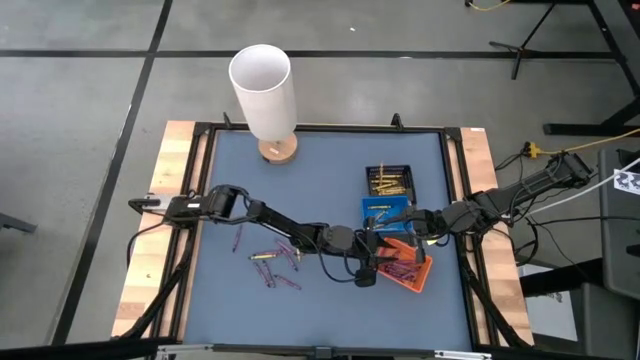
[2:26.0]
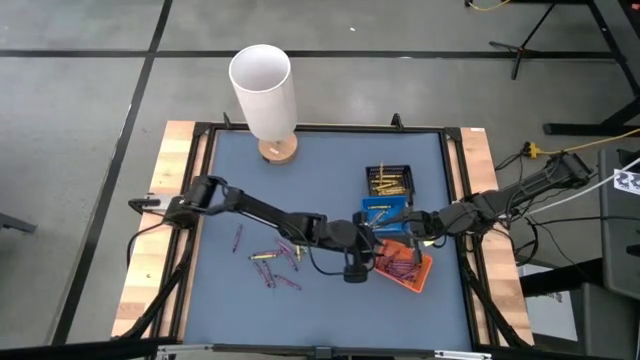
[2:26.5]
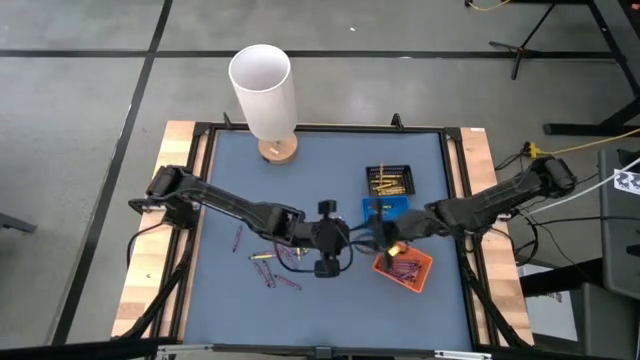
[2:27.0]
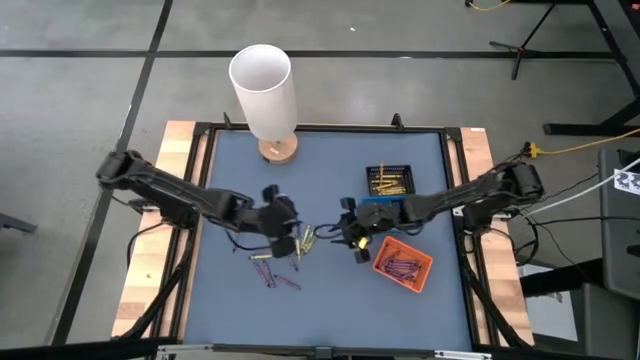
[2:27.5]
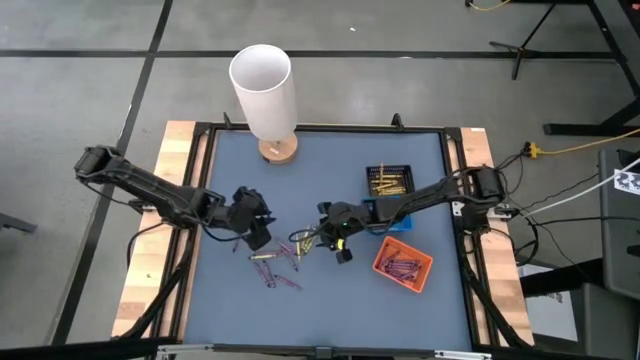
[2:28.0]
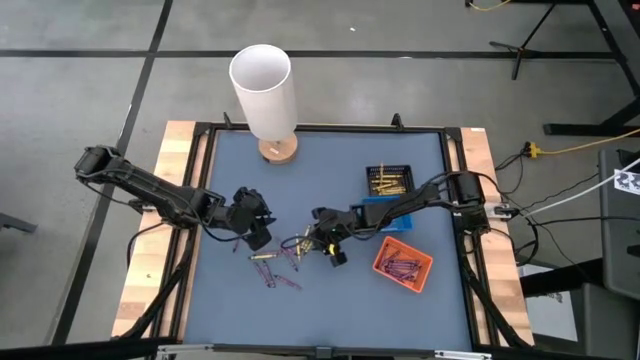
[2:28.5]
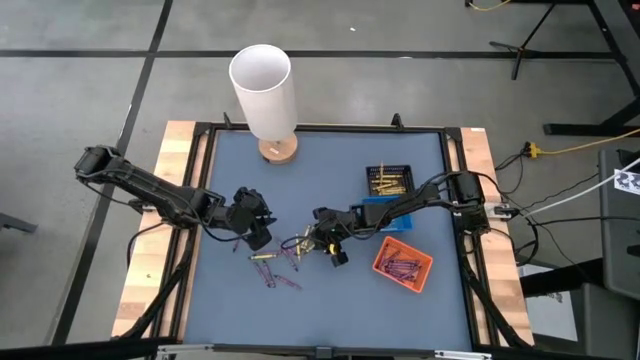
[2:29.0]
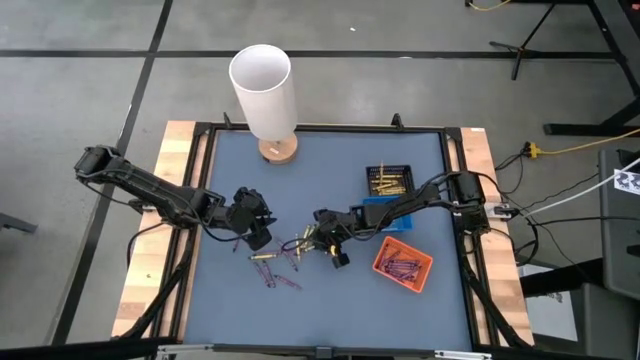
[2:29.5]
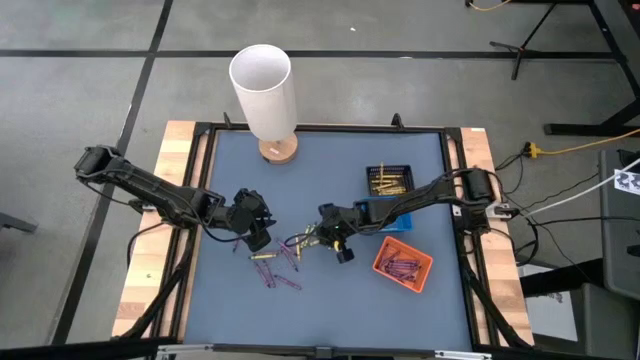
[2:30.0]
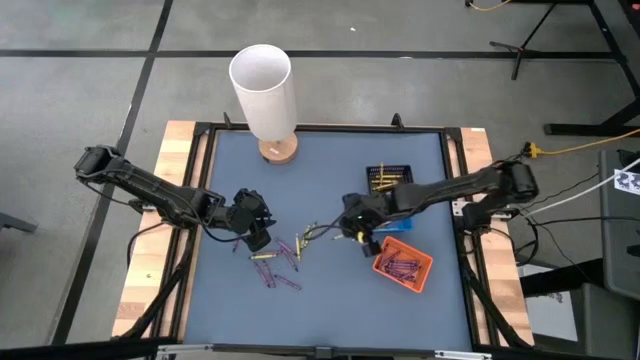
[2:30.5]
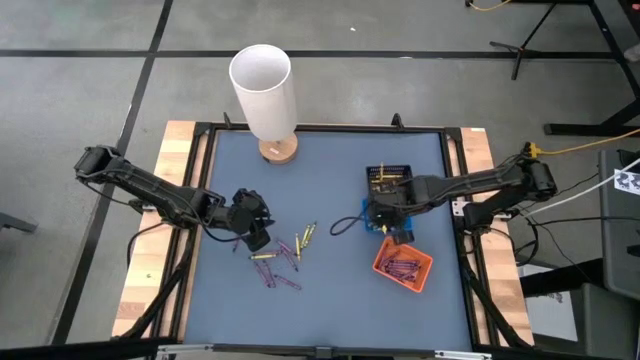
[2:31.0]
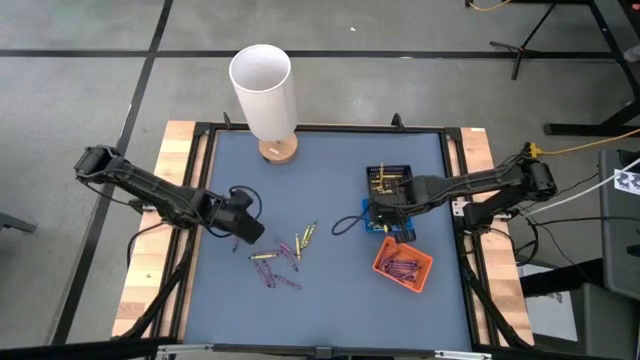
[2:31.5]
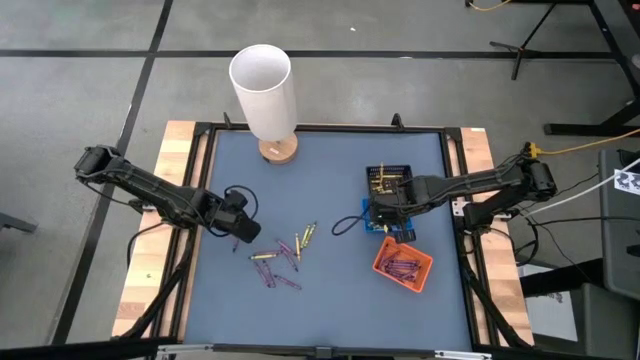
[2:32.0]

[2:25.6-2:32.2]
Task: Sort crayons
Put the green crayon into the blue bin

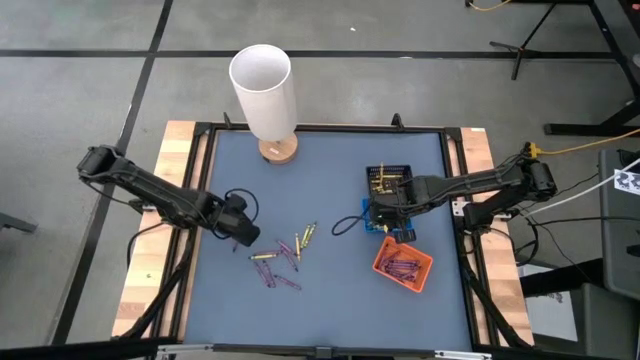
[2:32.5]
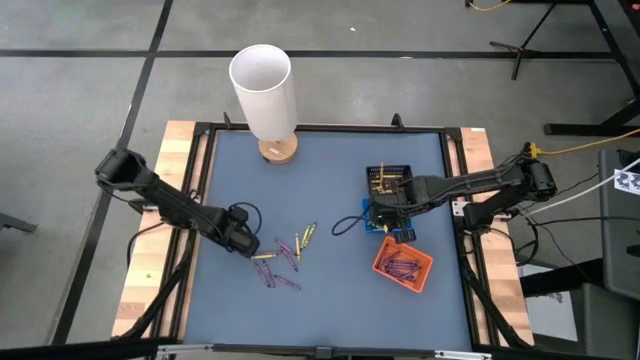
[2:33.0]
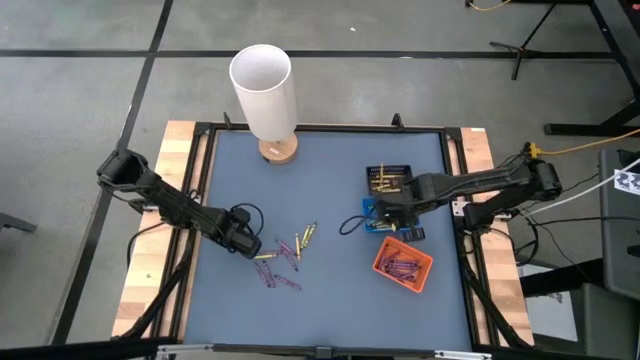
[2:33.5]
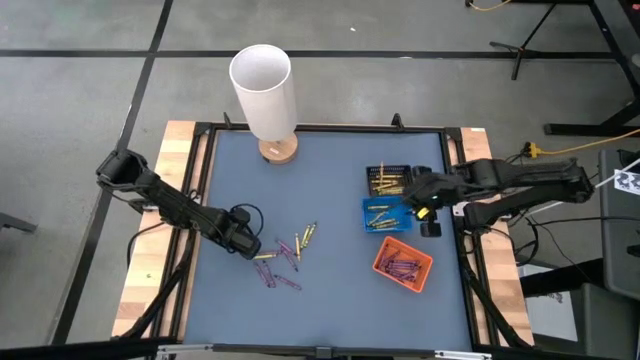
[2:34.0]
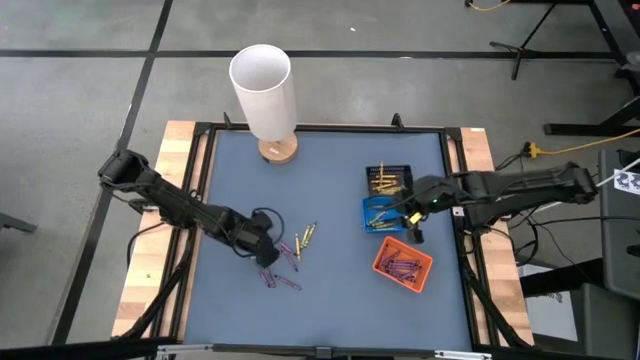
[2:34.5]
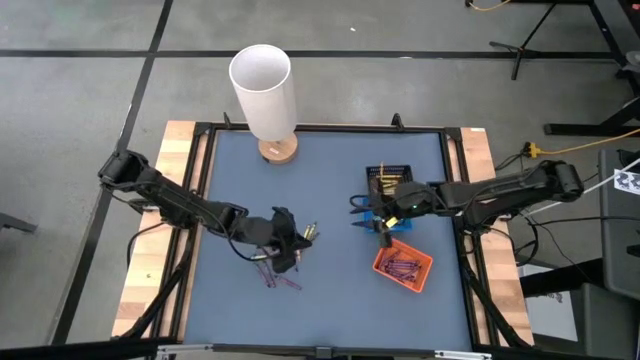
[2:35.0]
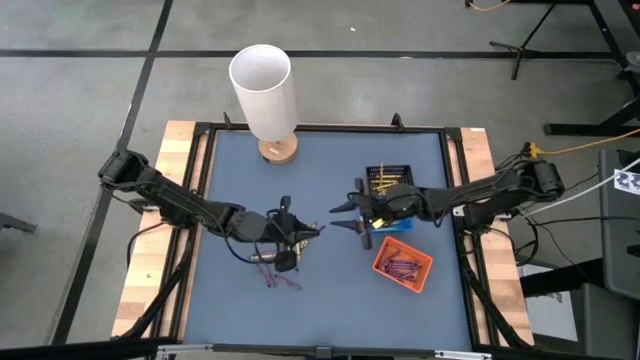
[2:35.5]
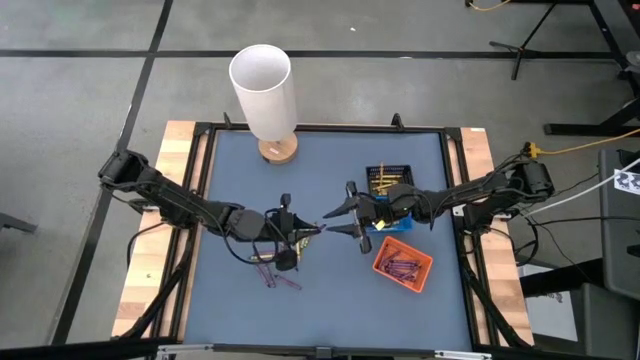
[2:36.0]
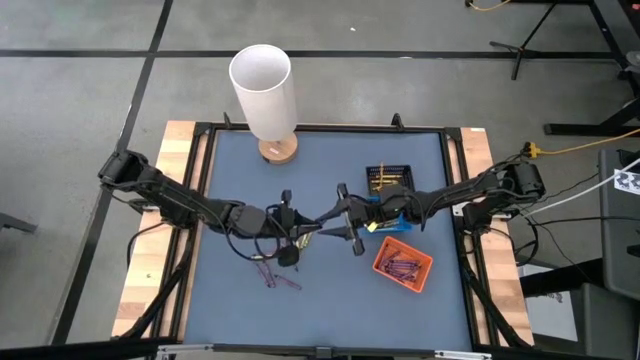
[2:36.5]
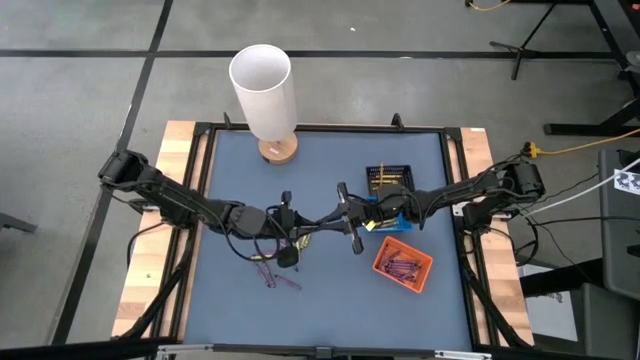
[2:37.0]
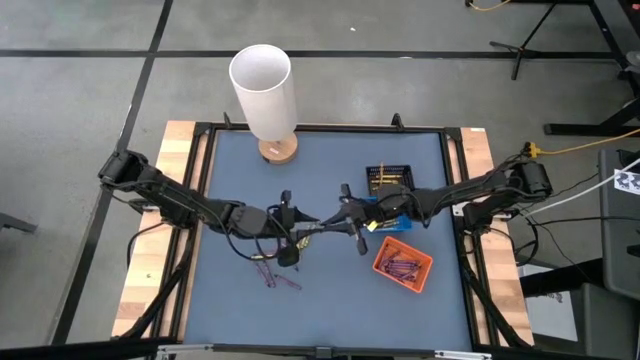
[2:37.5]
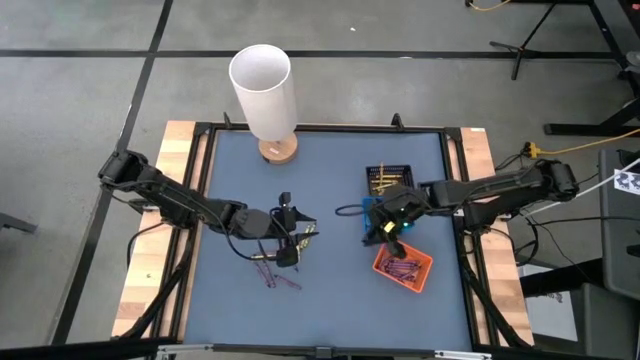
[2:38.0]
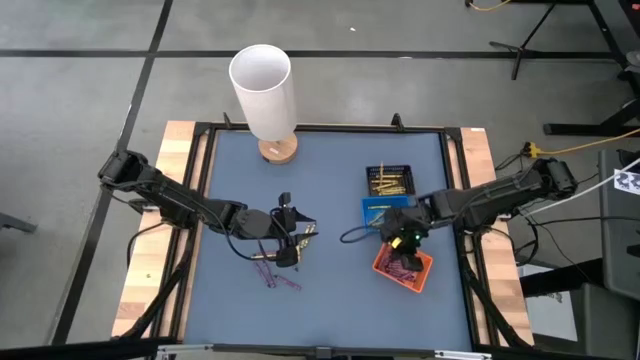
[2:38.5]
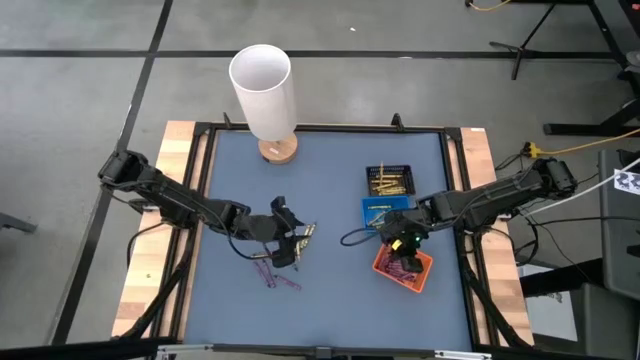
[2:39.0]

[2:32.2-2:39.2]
Put the purple crayon into the orange bin

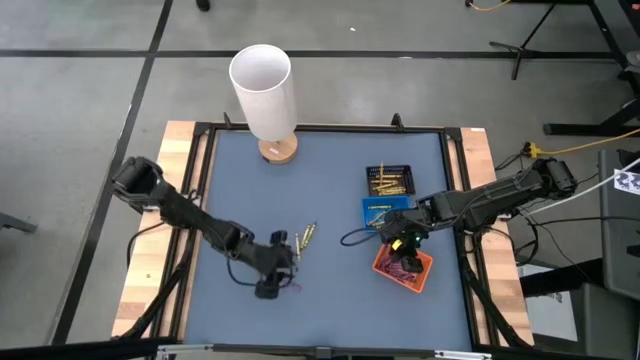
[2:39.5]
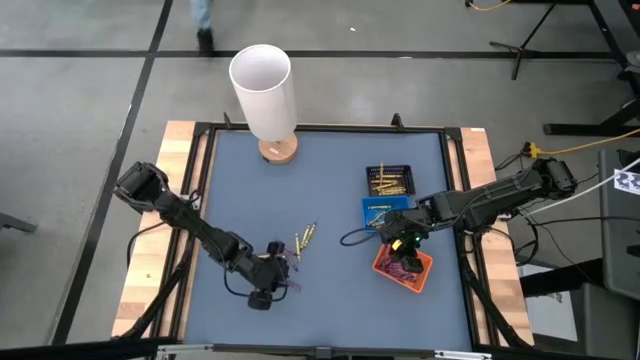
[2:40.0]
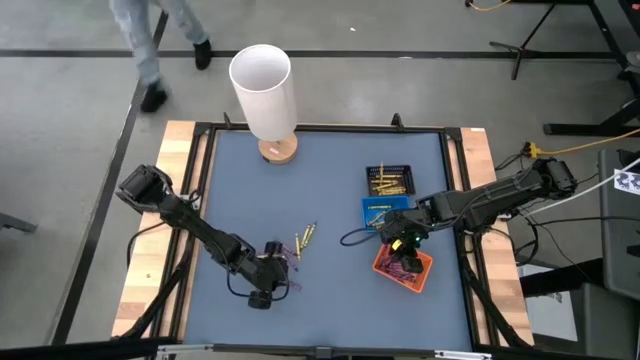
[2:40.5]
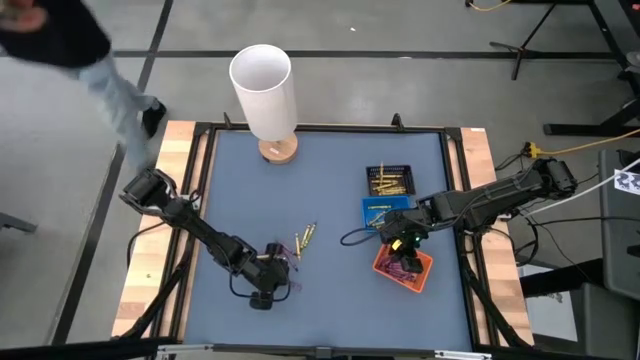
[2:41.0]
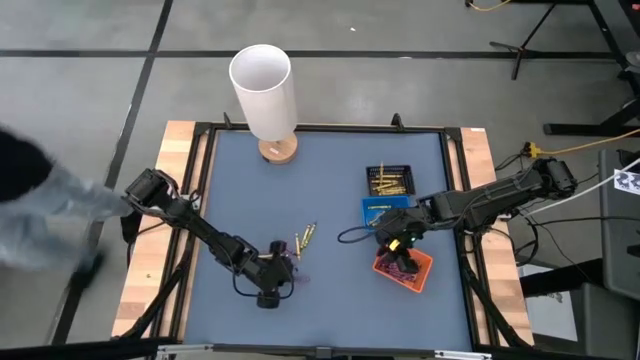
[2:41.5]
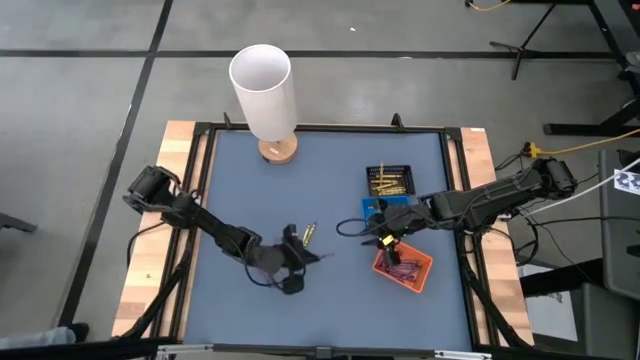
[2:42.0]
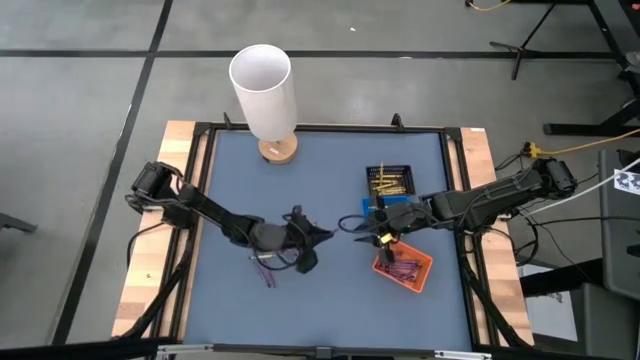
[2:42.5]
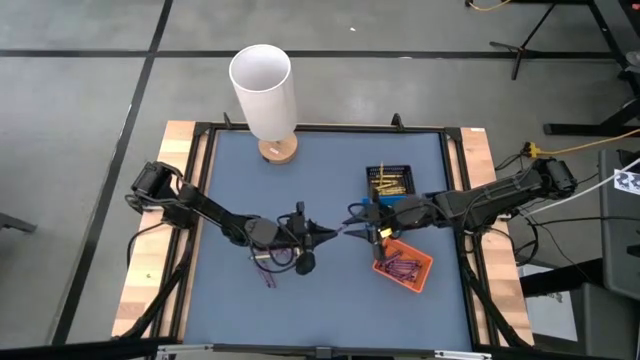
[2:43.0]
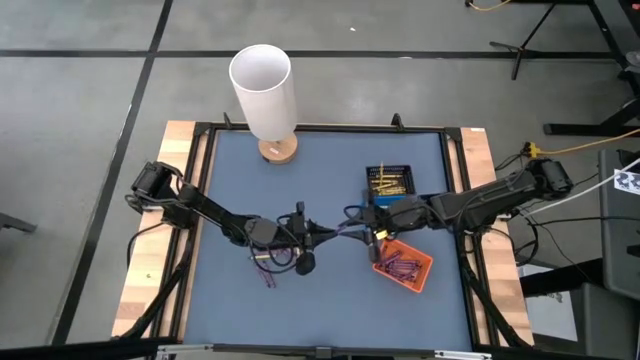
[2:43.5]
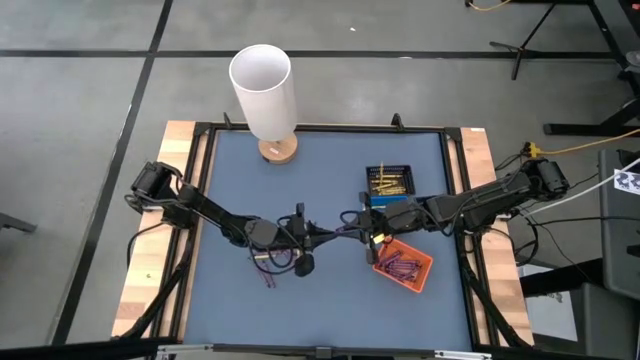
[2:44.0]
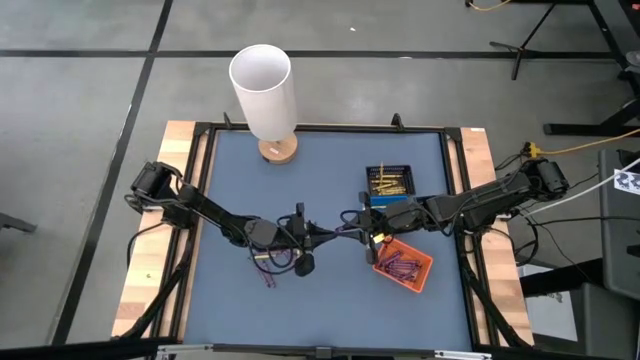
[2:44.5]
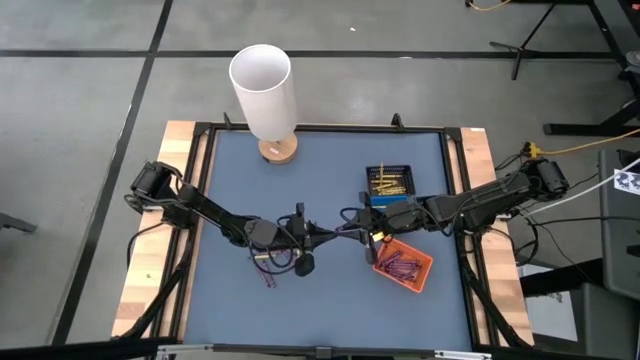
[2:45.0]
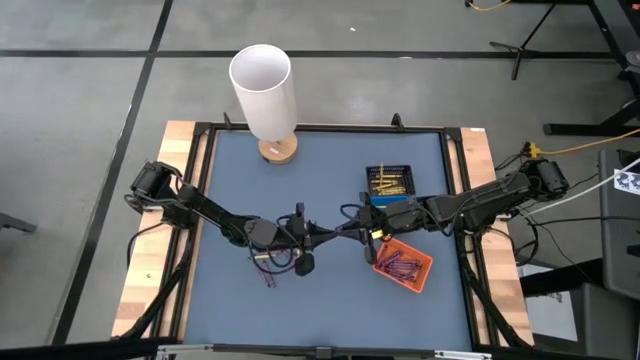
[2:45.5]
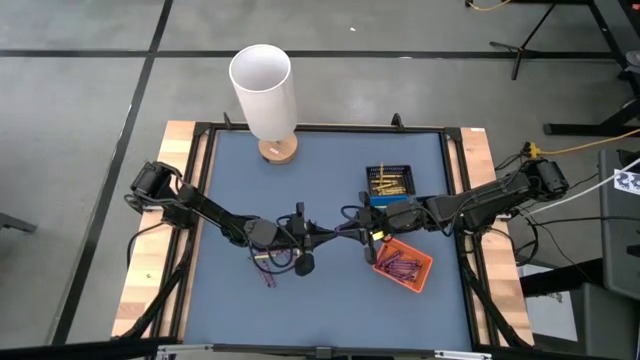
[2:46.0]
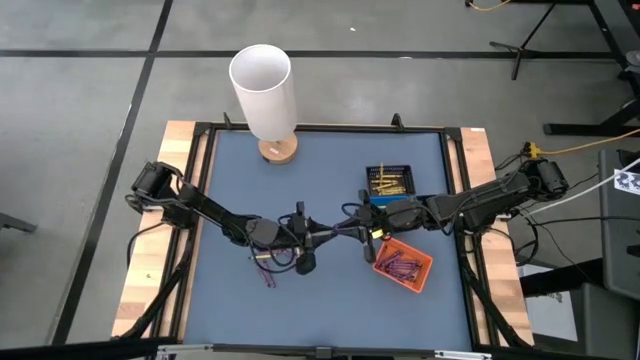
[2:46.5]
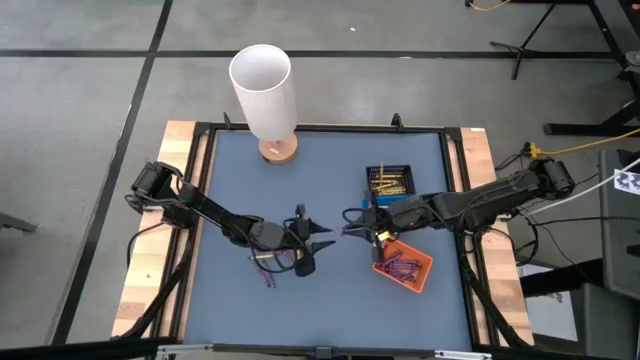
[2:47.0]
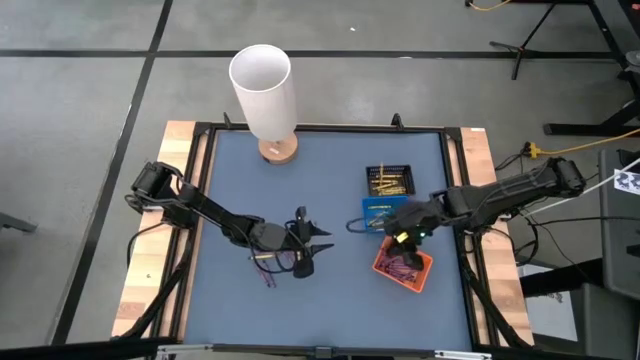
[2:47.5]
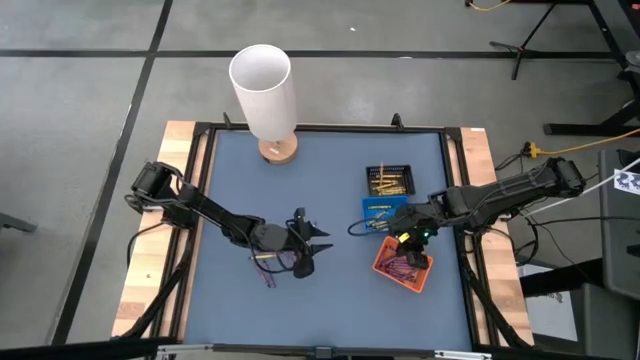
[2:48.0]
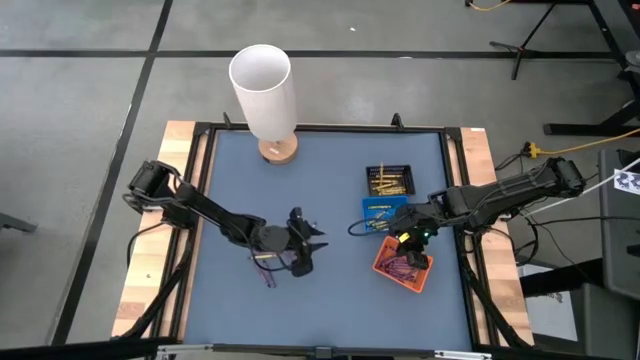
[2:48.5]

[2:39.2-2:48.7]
Put the purple crayon into the orange bin
